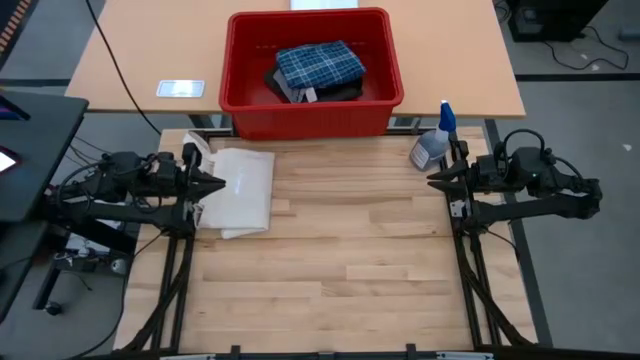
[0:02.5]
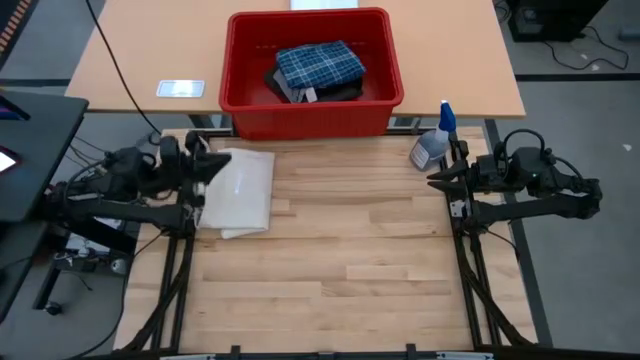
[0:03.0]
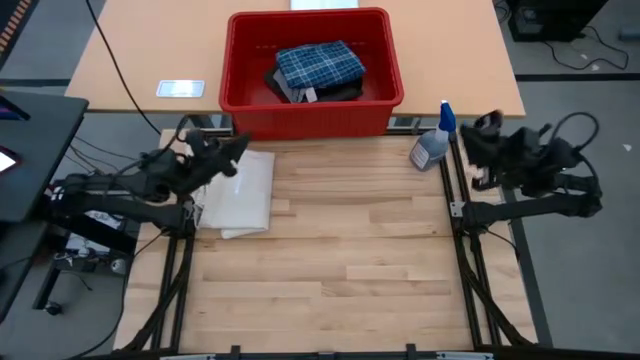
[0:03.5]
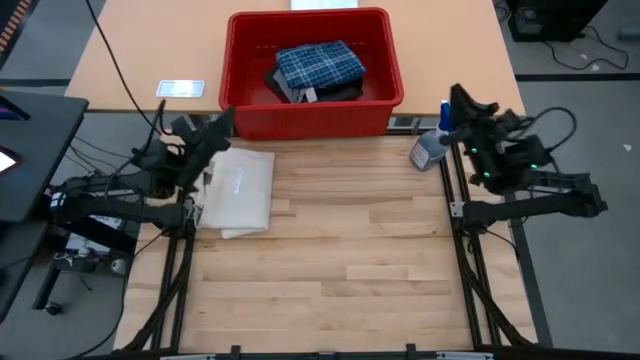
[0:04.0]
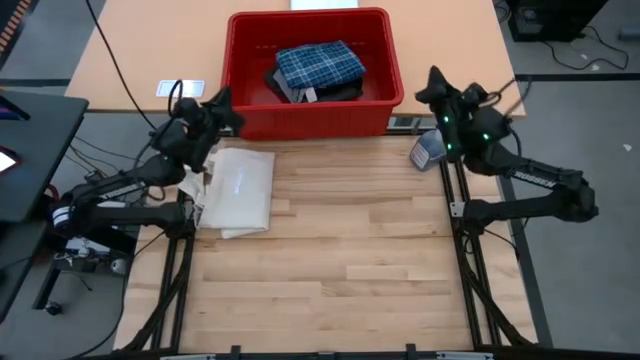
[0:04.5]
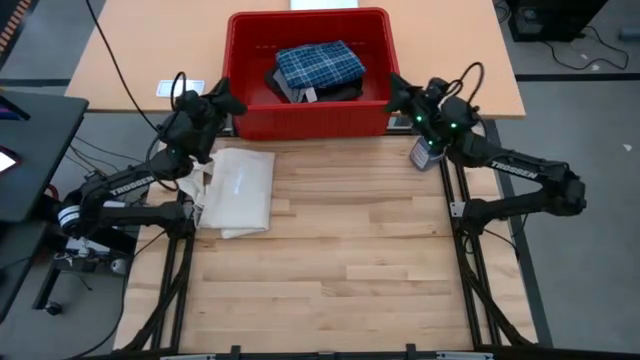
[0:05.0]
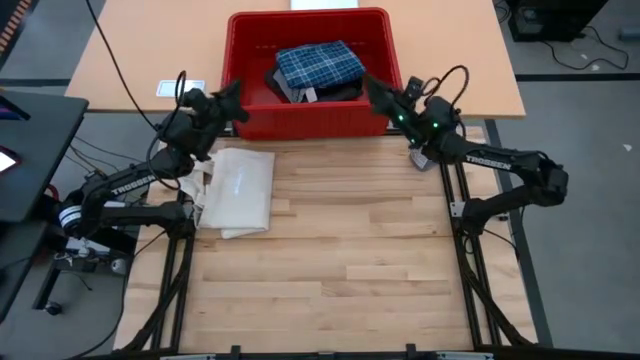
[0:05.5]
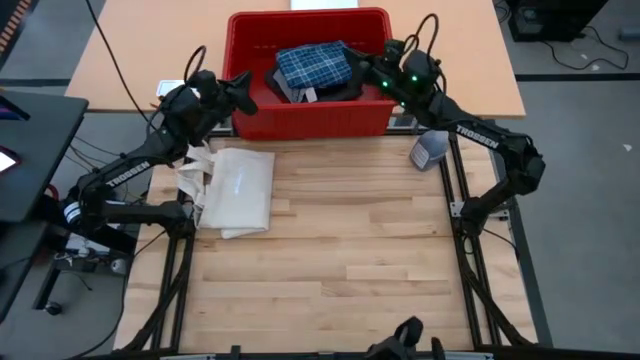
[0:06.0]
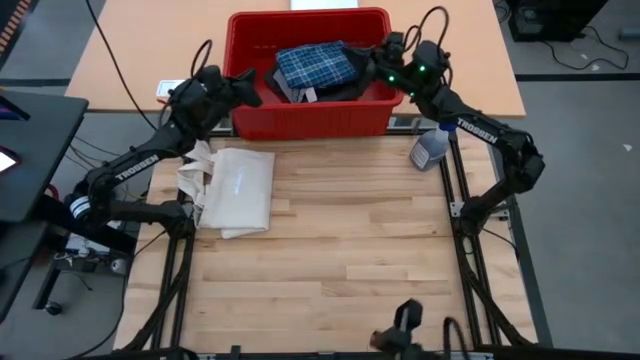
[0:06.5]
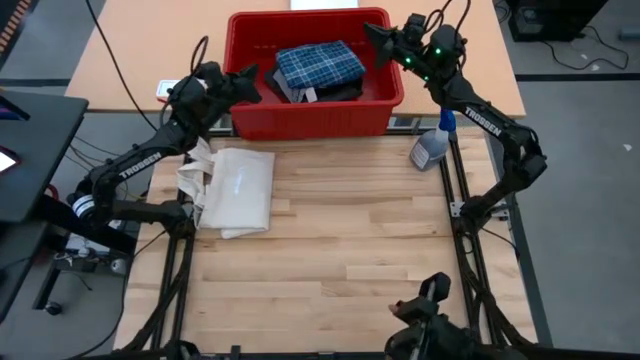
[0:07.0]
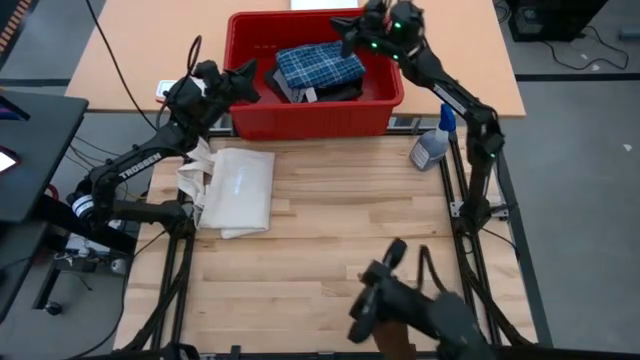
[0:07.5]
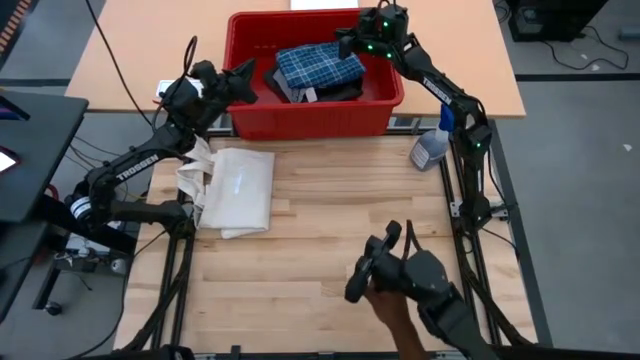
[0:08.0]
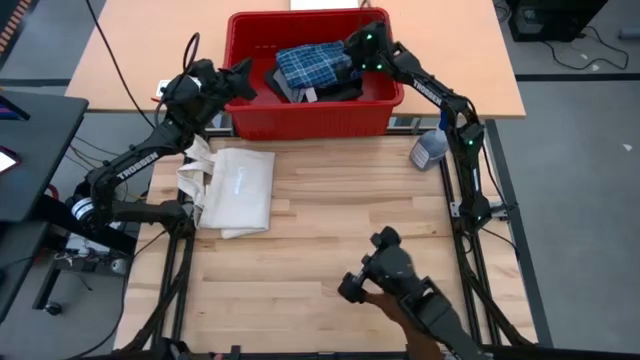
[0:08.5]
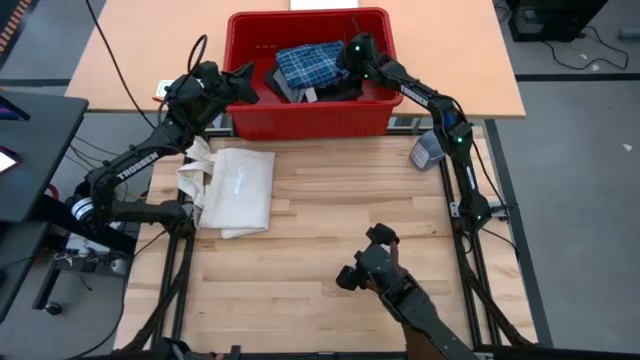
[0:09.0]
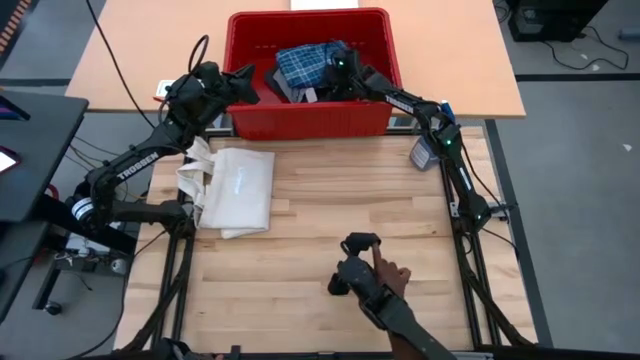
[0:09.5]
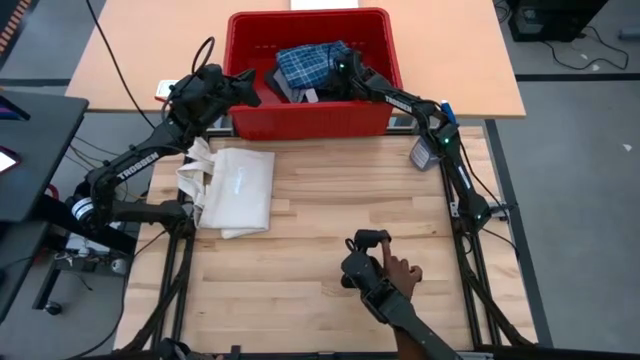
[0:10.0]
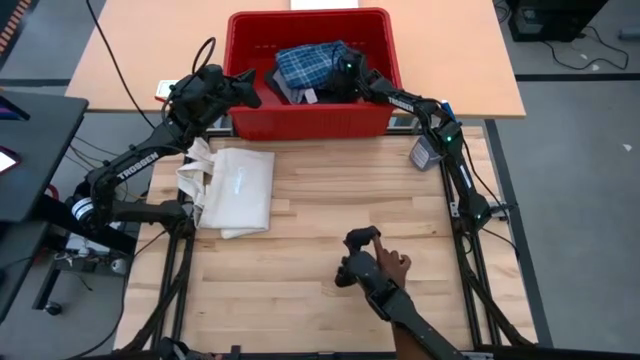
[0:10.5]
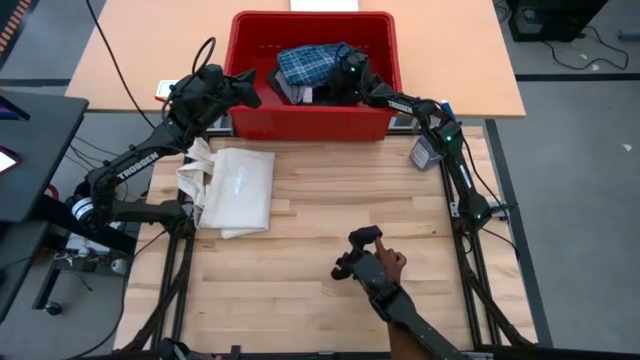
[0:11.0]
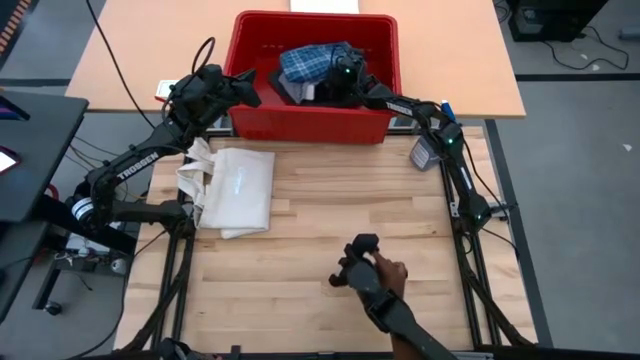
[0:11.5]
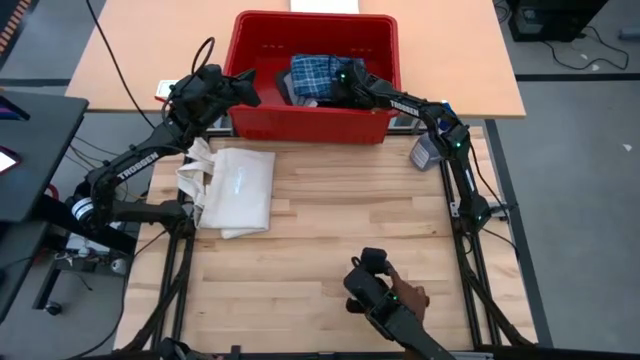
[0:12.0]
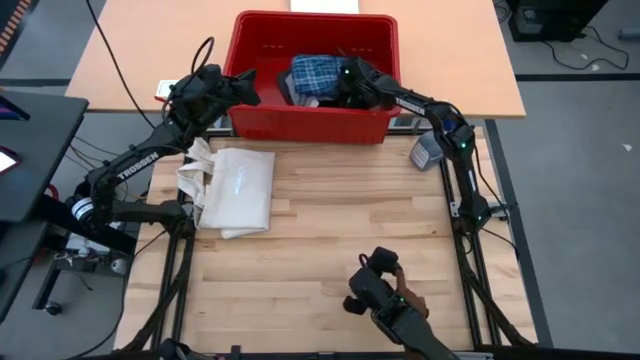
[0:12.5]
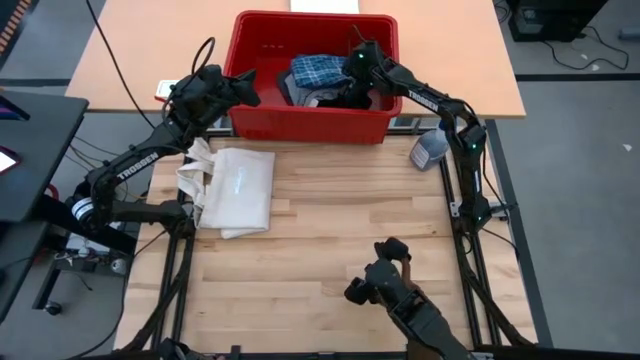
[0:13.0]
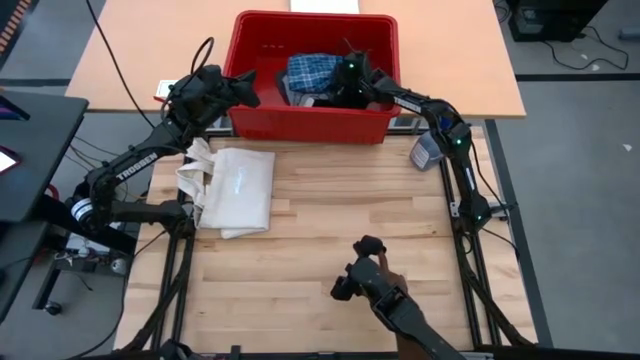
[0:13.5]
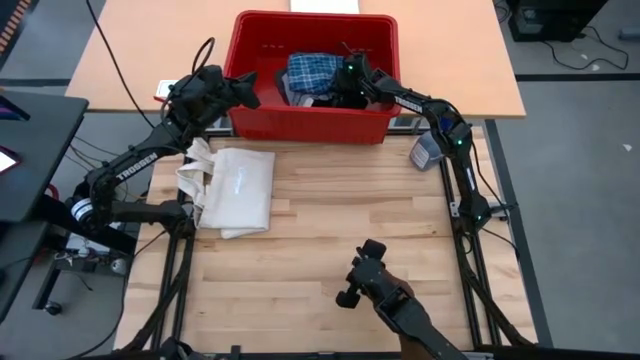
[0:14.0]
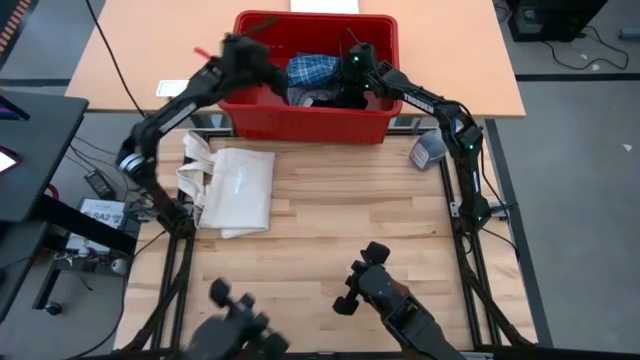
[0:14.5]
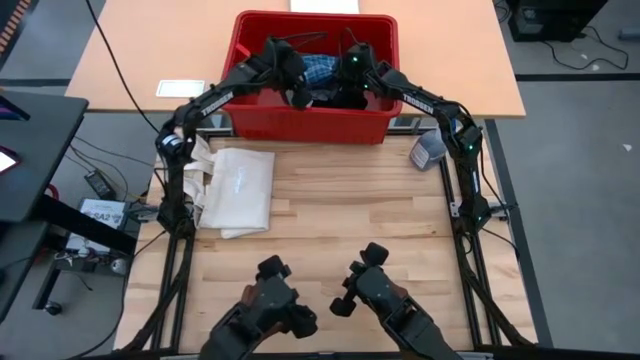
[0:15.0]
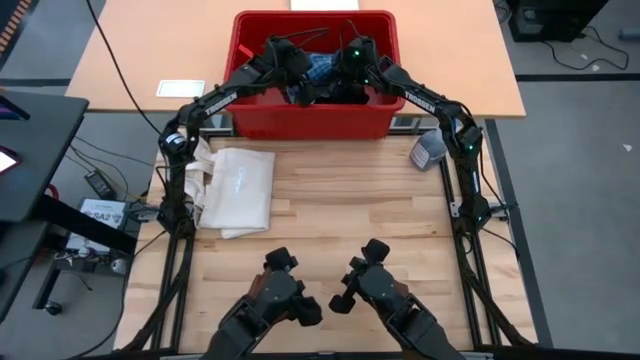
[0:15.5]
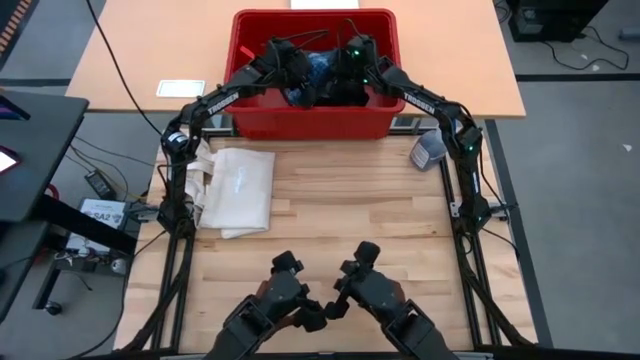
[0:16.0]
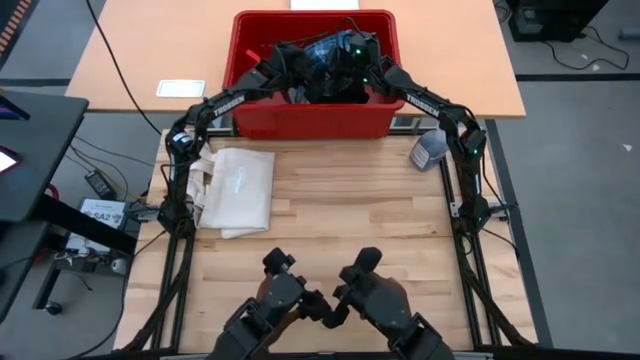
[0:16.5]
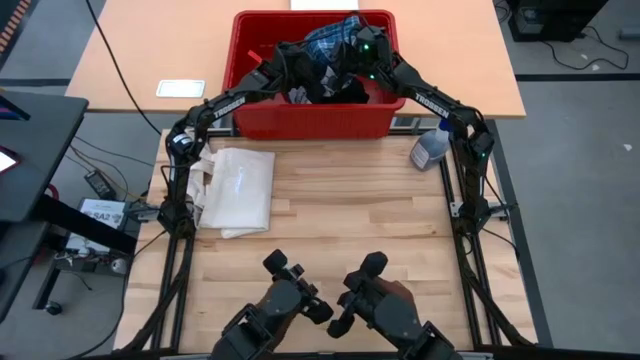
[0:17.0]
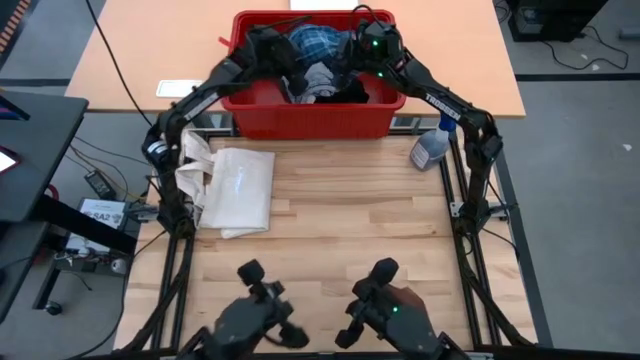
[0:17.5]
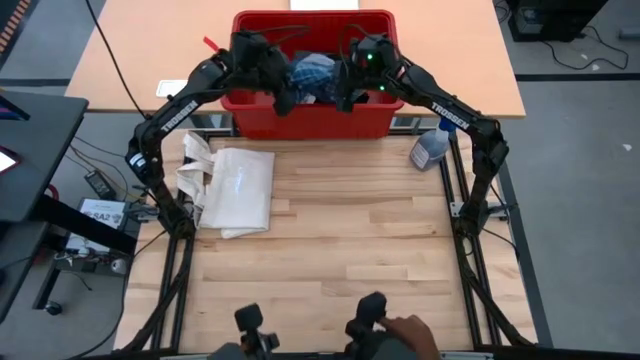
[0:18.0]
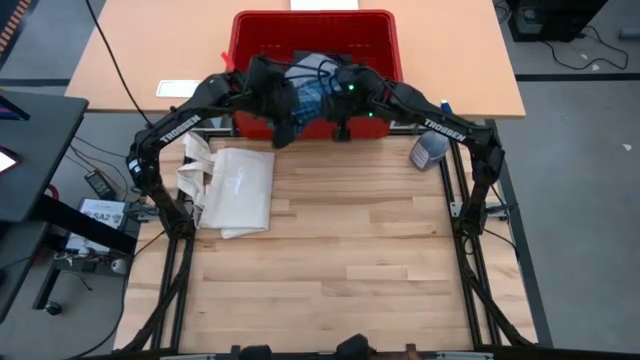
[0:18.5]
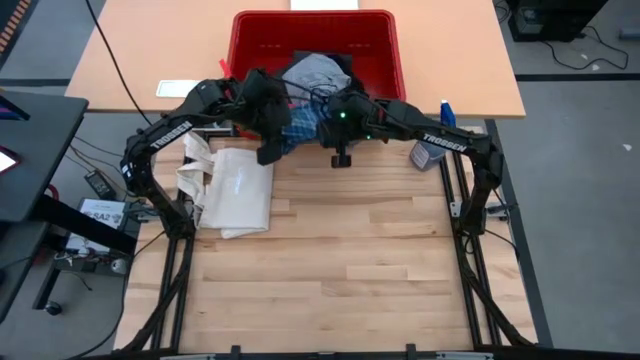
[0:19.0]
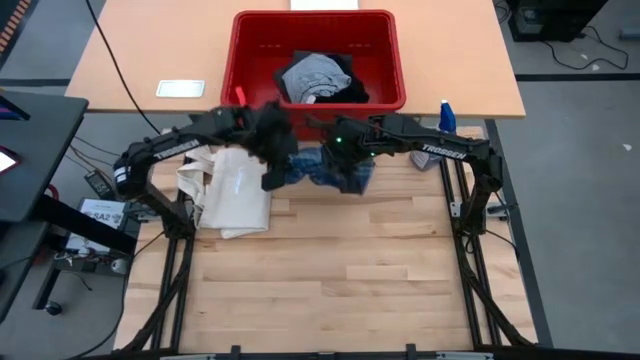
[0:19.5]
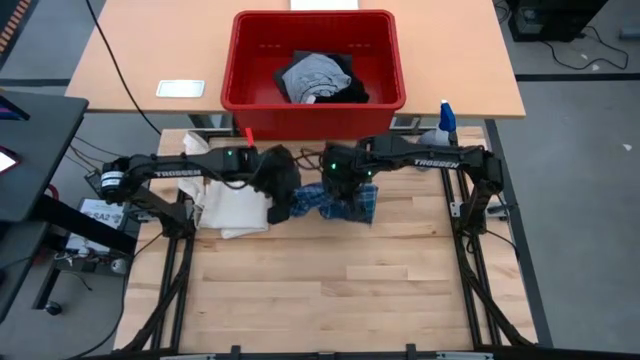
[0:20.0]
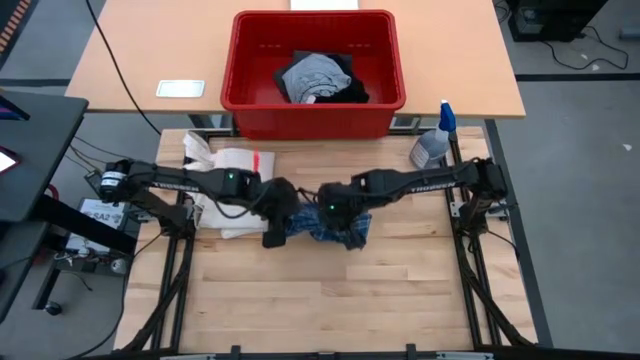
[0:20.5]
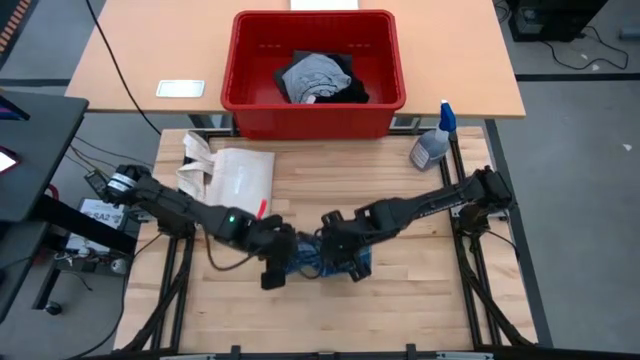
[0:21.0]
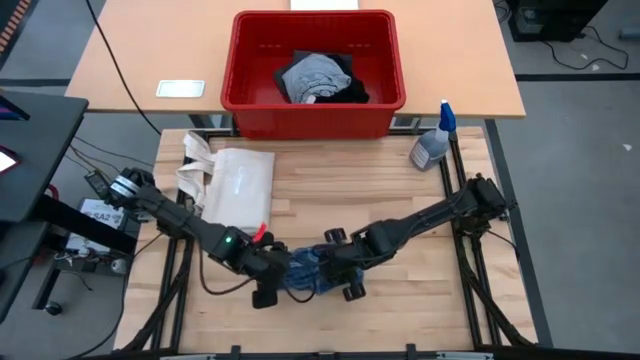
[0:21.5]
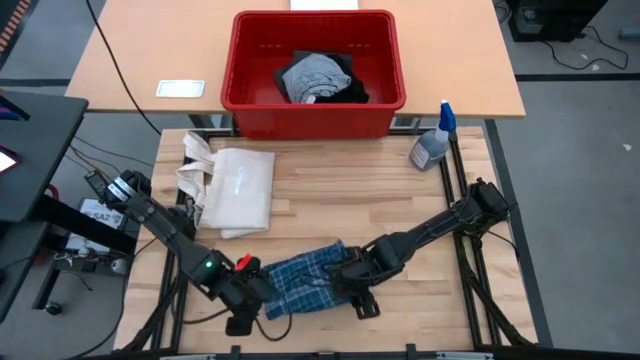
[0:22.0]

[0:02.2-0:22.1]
Task: Sort clothes
Remove the blue pants from the red bin
